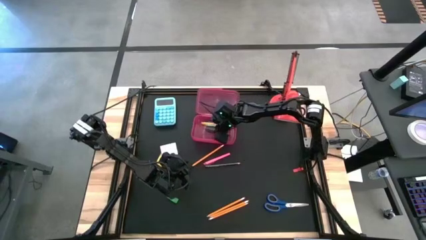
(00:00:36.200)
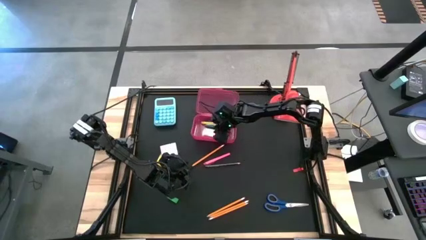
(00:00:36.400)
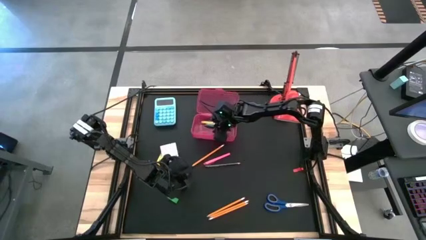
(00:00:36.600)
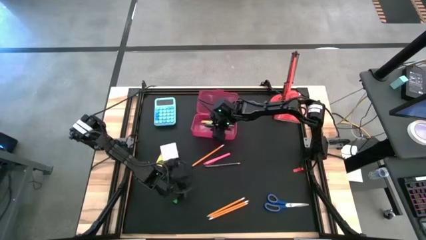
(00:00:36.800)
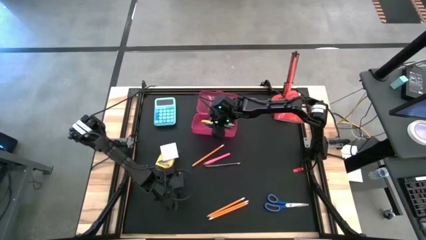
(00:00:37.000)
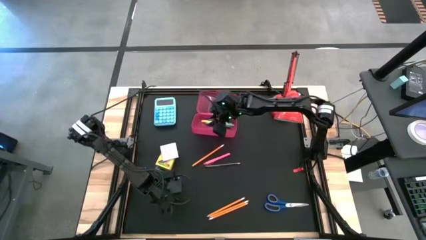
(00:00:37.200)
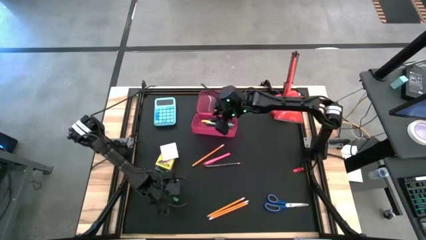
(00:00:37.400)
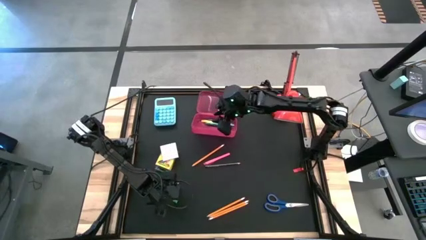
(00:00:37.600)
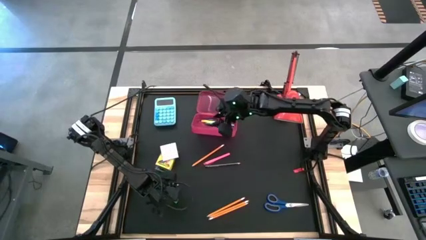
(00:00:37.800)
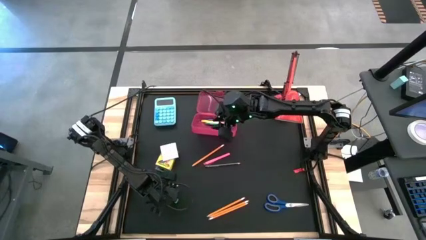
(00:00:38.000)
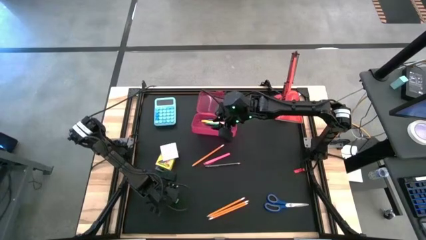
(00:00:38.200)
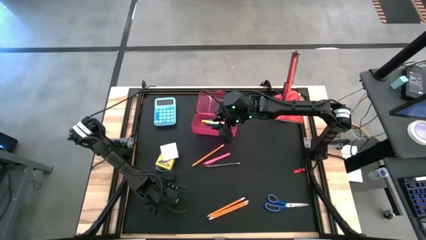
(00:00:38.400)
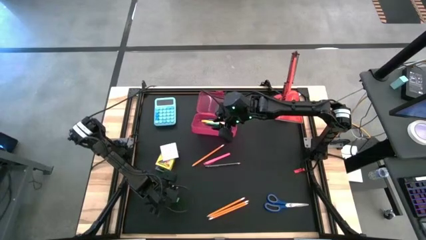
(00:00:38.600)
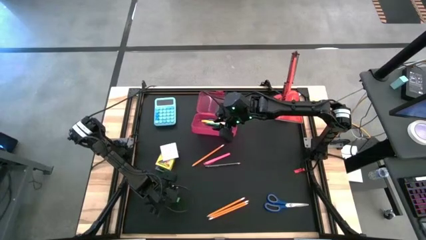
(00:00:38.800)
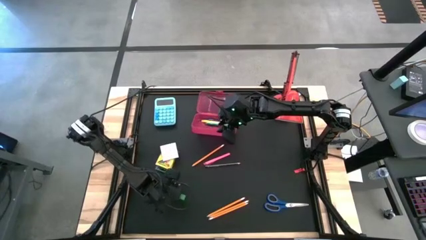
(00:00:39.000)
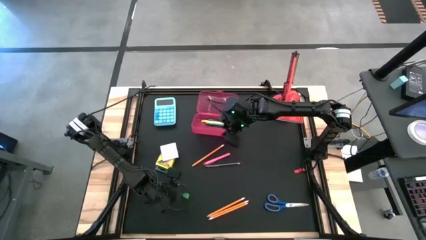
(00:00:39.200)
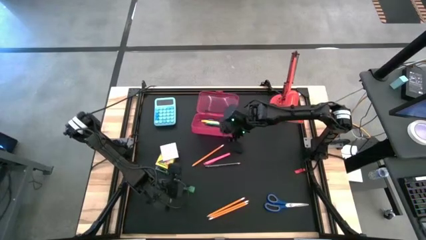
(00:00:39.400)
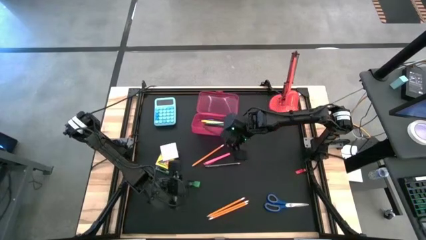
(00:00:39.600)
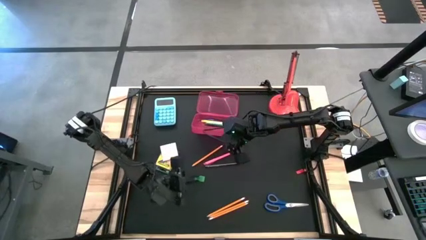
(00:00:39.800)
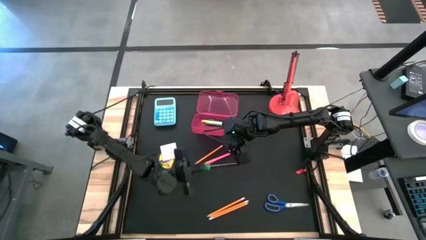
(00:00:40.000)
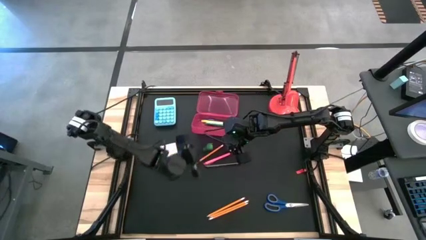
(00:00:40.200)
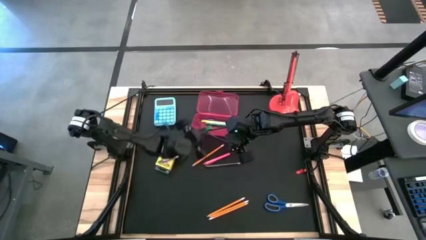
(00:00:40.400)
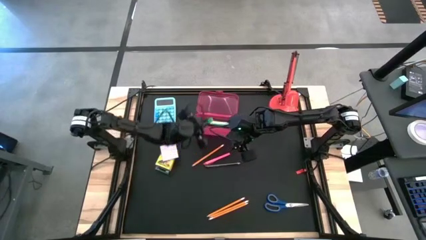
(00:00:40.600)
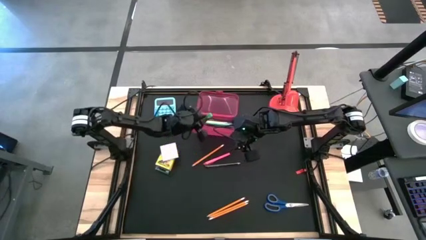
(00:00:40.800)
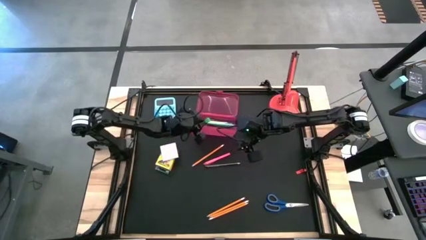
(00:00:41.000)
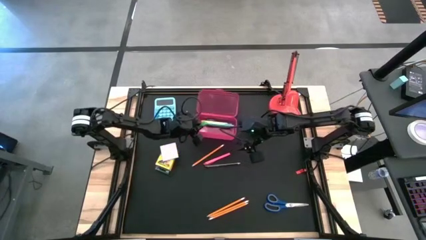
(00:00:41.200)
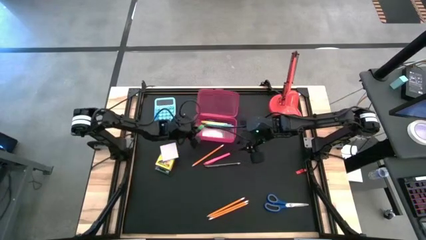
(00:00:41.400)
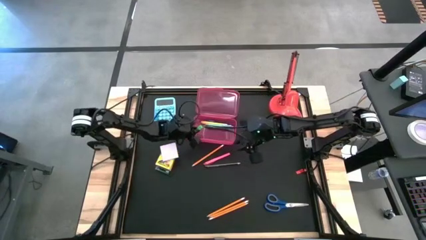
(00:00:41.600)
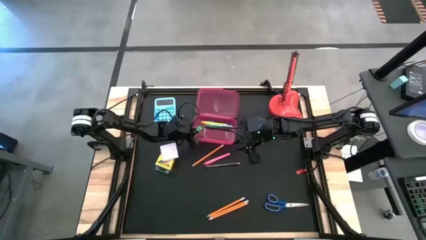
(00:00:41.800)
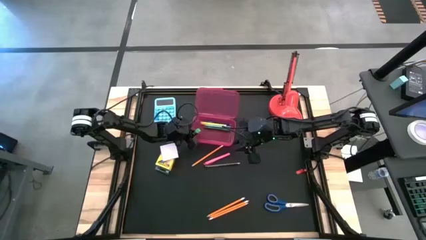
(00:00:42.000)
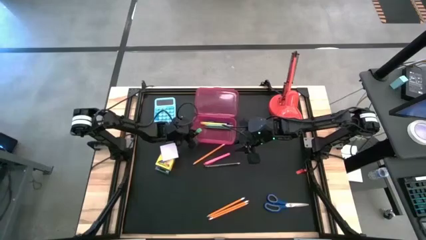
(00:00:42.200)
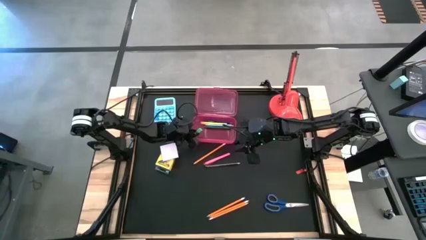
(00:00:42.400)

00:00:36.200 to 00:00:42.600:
Task: Pack school essentials
Put the green eraser into the pink supply box

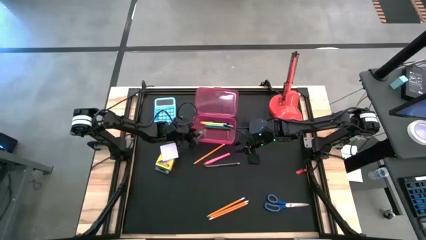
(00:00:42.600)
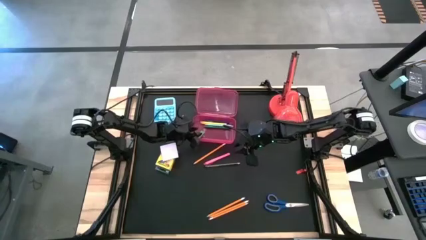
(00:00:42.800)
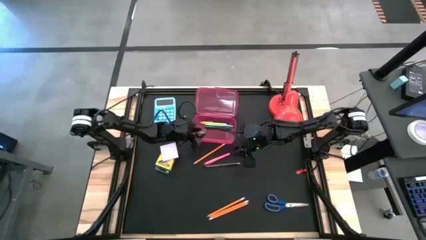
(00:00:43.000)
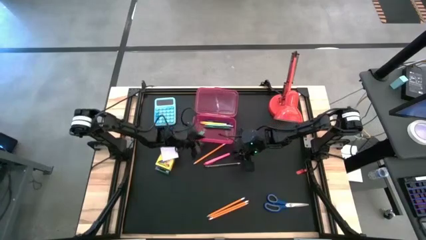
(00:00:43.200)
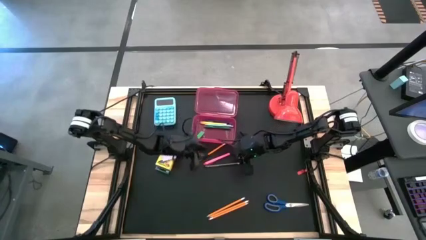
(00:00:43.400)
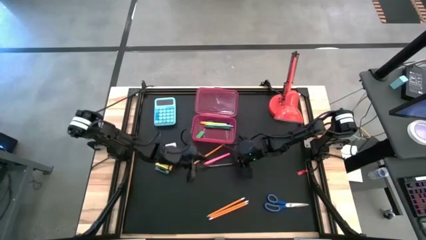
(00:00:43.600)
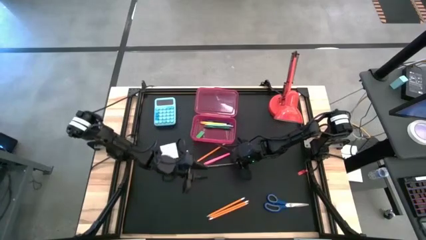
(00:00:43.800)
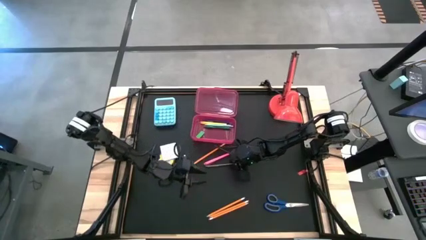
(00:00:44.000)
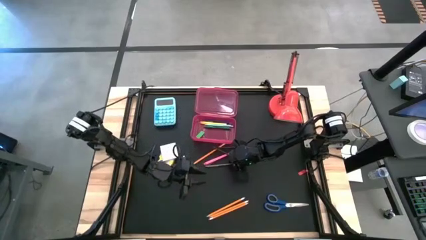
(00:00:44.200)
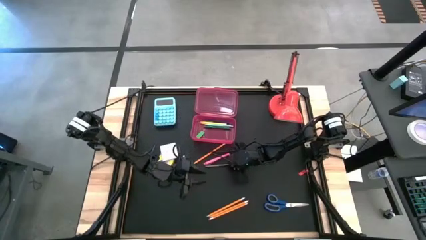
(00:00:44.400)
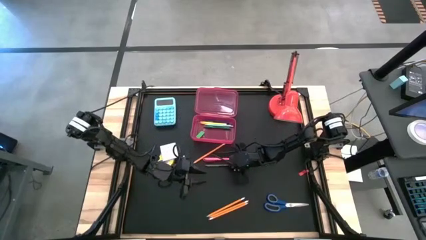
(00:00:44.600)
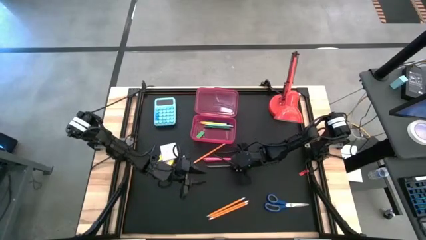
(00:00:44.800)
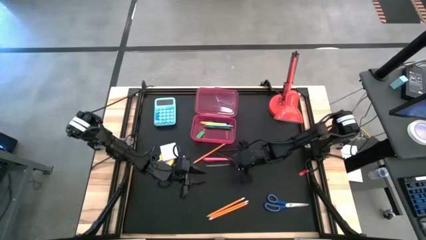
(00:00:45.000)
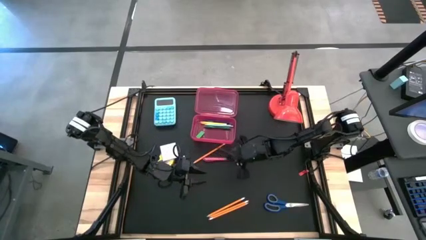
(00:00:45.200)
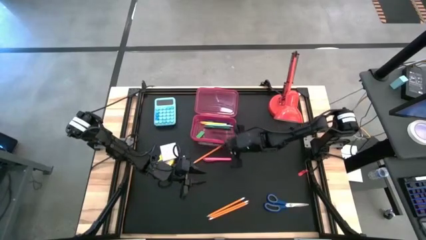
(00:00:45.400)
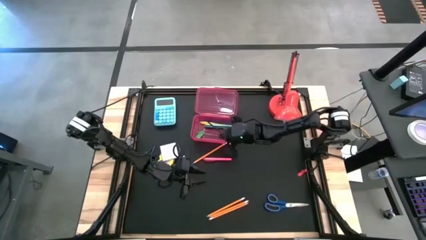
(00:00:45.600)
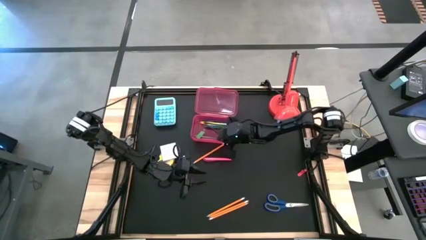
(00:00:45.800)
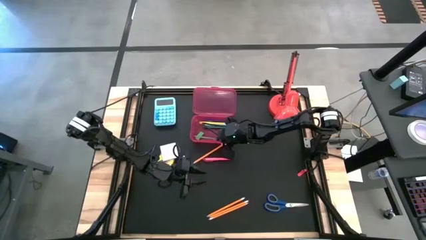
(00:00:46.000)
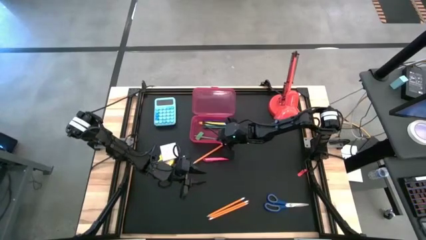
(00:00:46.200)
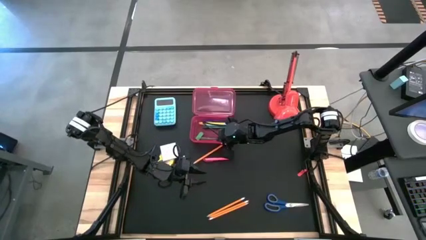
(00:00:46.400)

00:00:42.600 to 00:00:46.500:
Put the black pencil into the pink supply box

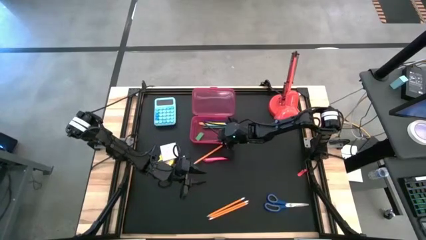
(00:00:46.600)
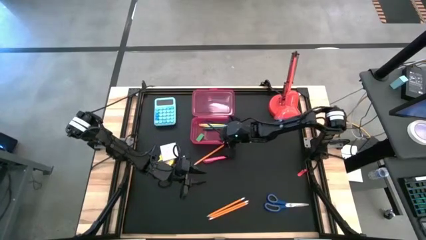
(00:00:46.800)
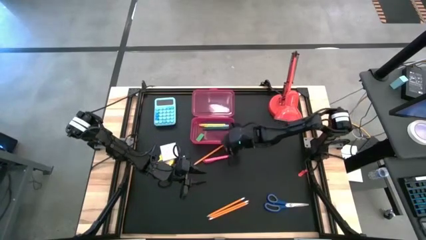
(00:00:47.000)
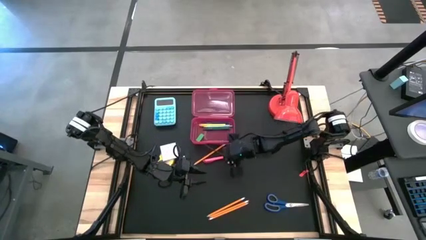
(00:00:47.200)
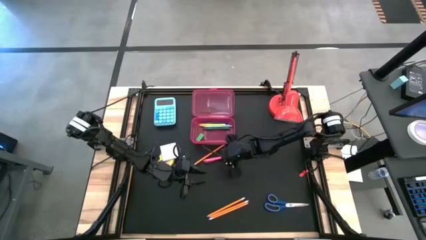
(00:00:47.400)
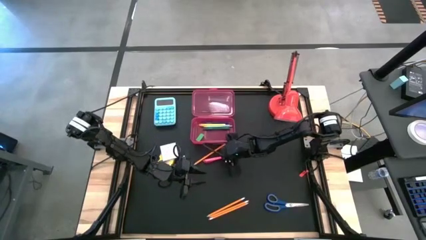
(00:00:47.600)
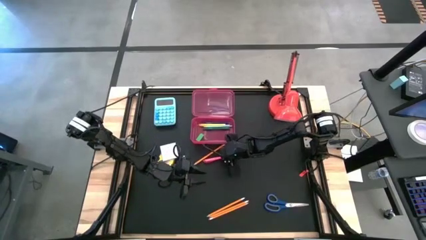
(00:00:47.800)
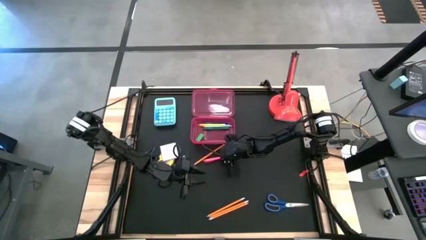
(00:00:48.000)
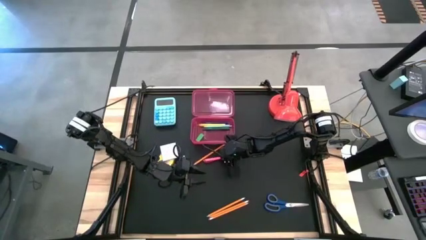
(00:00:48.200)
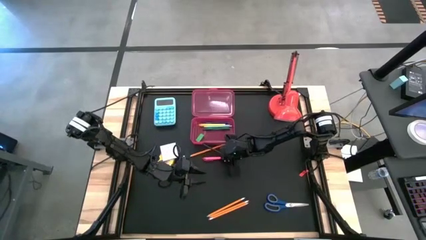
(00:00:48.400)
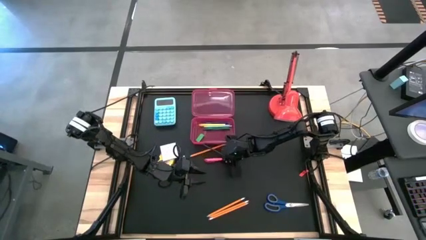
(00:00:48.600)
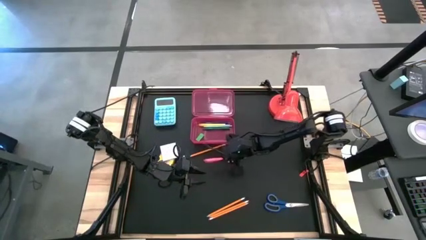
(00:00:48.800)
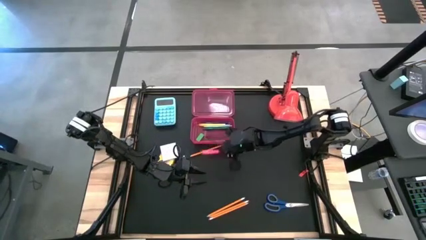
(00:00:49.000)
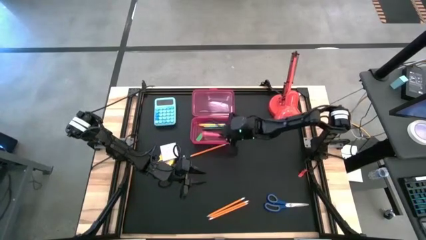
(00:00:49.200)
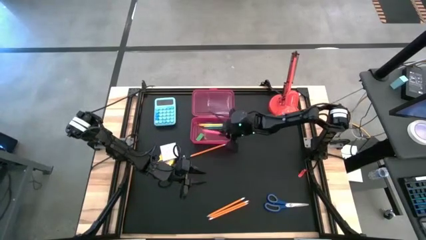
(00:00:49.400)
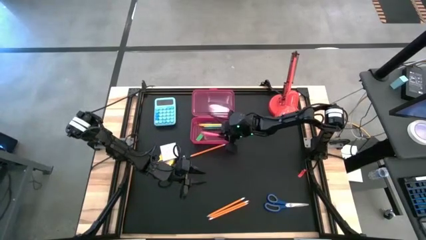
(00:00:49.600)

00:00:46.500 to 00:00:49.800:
Put the pink pen into the pink supply box

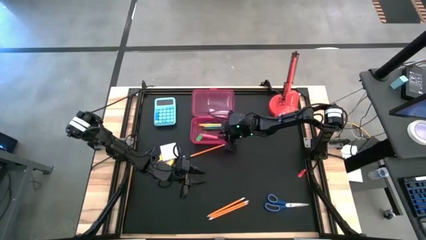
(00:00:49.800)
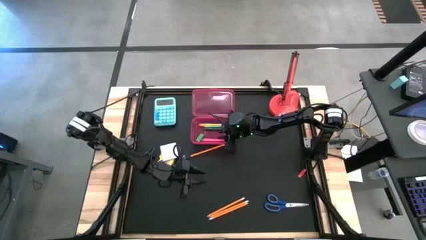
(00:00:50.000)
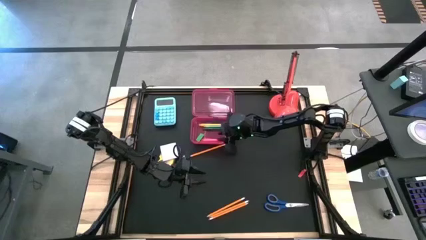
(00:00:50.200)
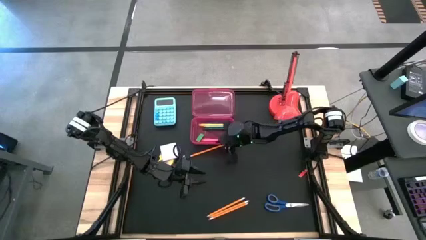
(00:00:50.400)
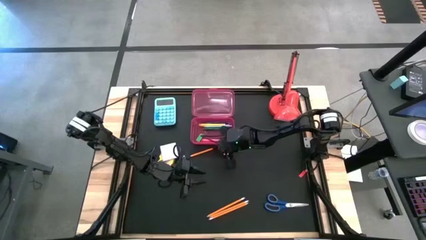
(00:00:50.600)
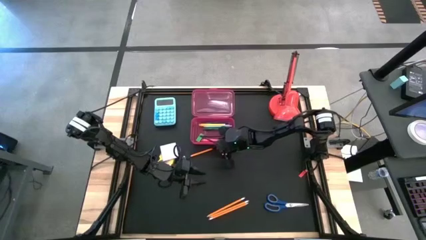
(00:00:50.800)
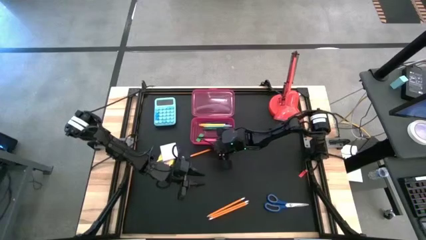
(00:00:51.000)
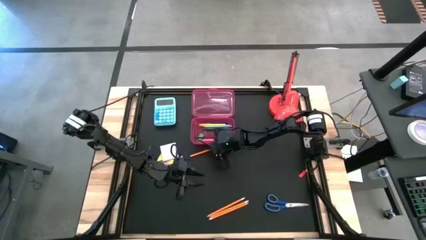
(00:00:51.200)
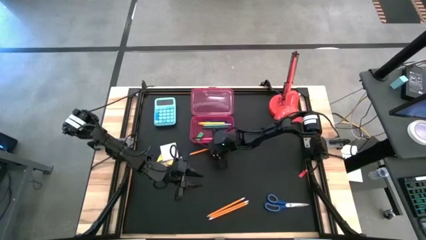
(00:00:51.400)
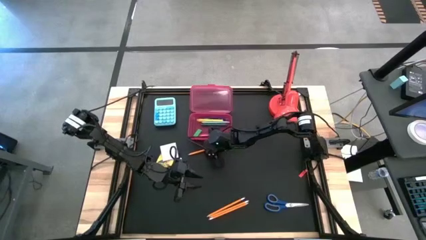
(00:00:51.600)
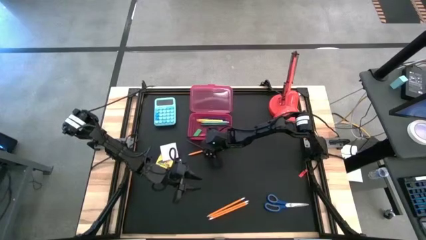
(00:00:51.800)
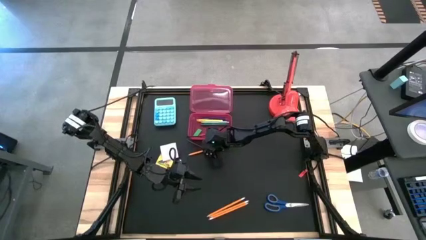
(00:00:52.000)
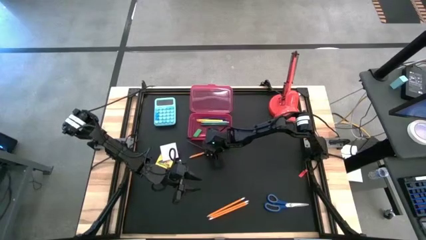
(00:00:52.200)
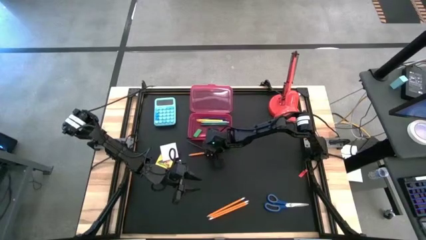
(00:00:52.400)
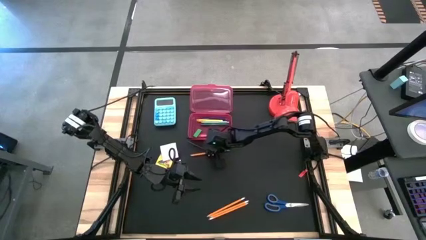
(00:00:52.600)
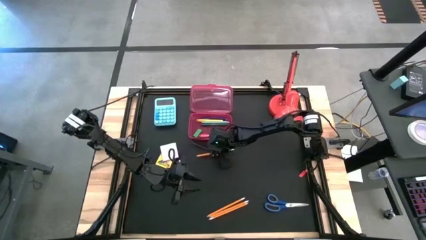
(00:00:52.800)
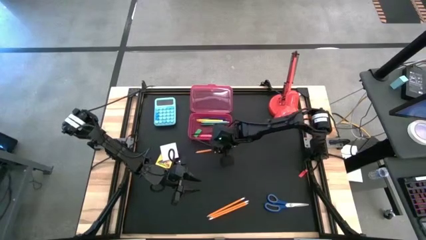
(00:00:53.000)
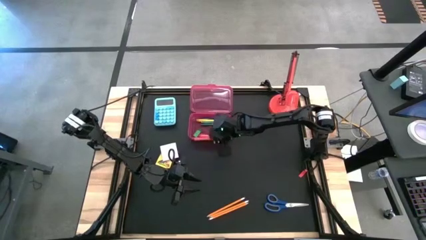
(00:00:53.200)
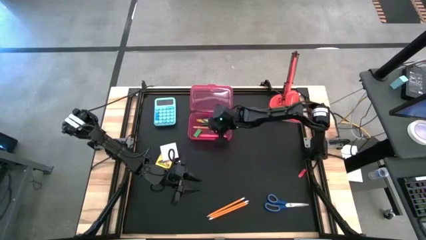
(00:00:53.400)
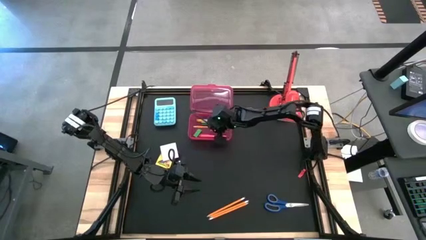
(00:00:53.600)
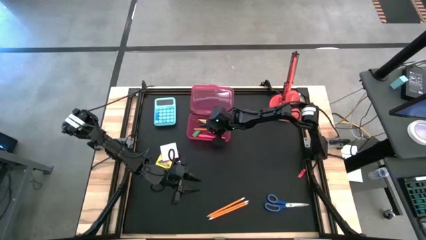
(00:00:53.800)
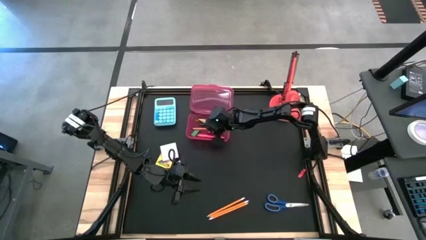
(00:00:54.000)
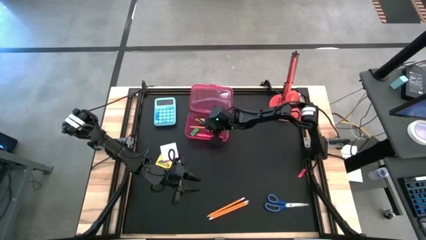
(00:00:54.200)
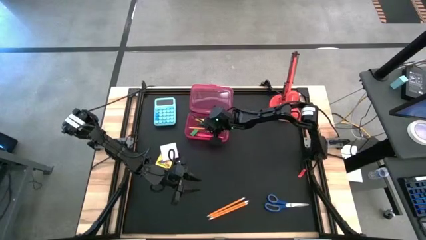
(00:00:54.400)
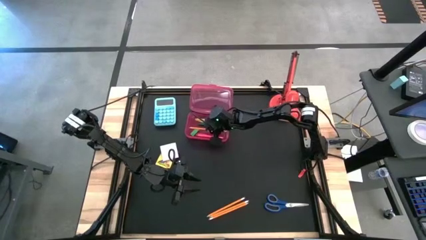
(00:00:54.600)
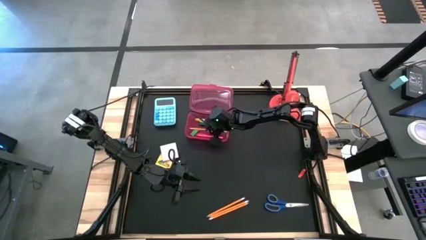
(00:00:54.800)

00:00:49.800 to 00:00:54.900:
Put the yellow pencil into the pink supply box
